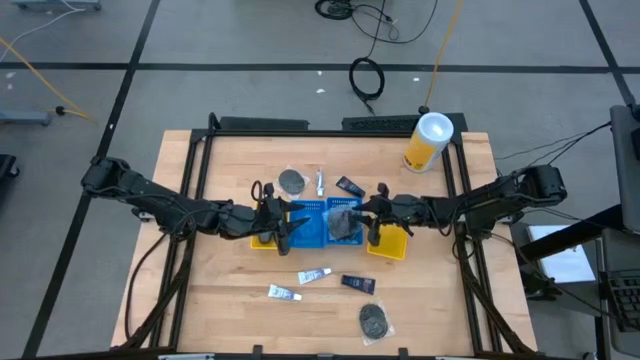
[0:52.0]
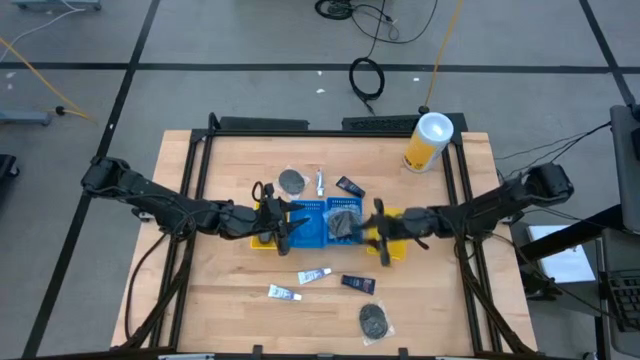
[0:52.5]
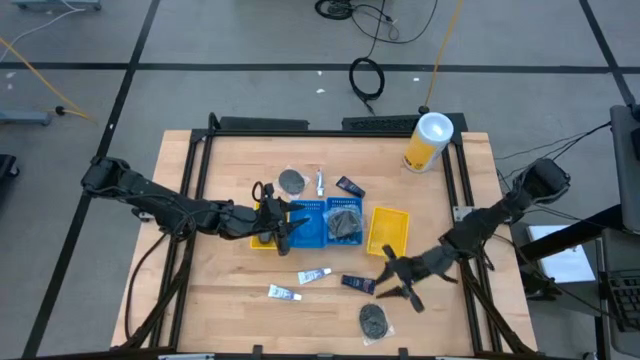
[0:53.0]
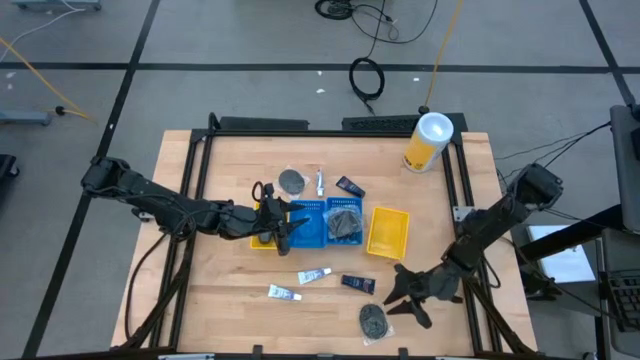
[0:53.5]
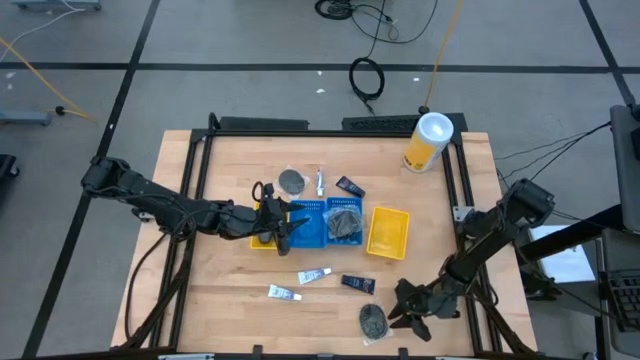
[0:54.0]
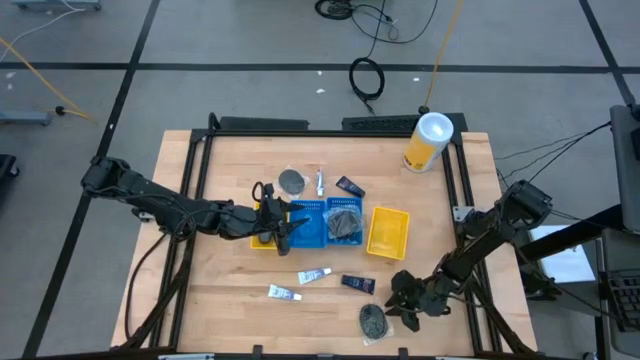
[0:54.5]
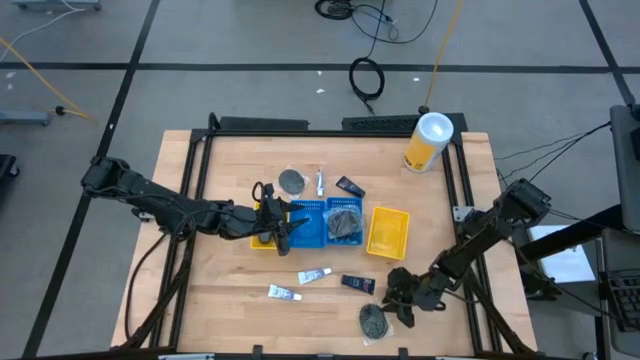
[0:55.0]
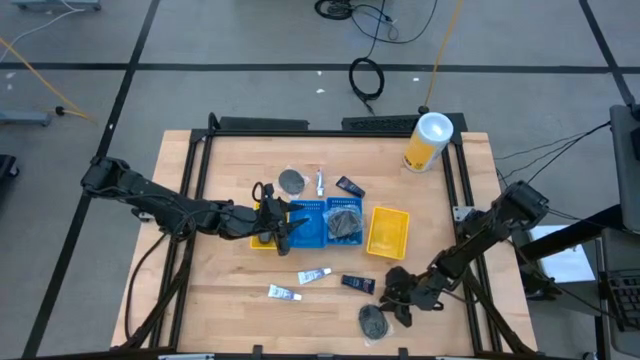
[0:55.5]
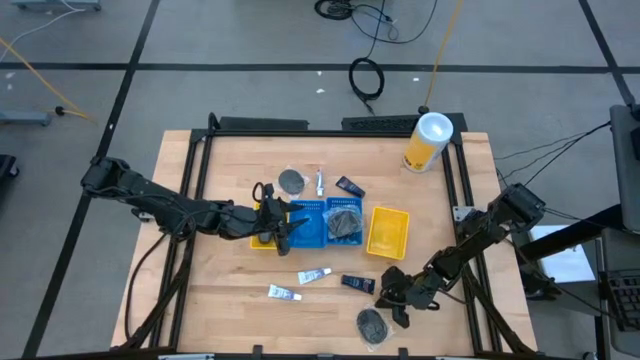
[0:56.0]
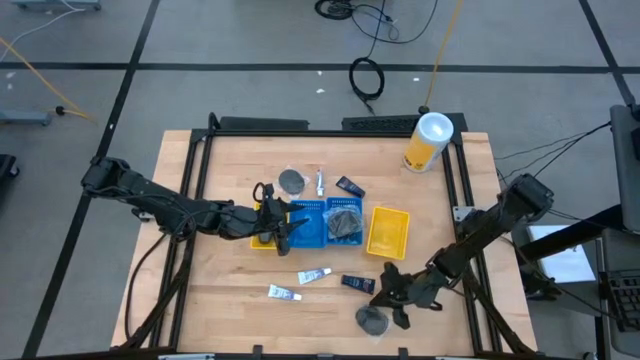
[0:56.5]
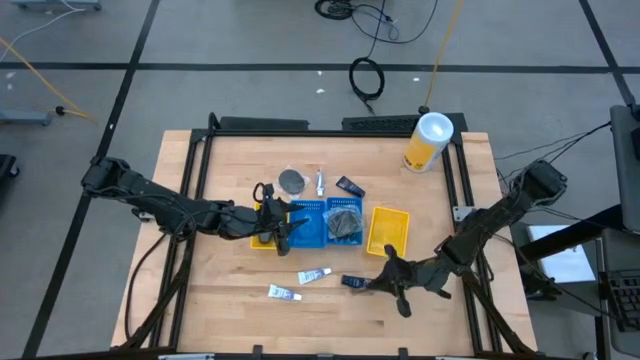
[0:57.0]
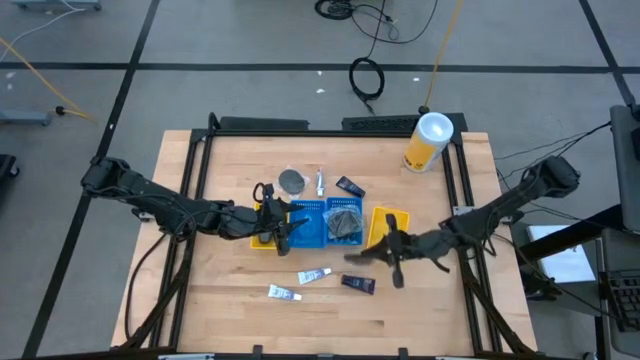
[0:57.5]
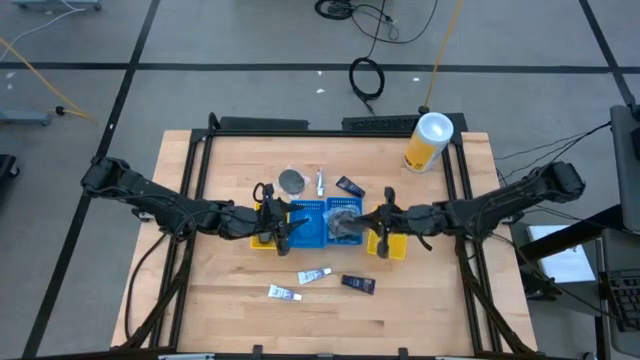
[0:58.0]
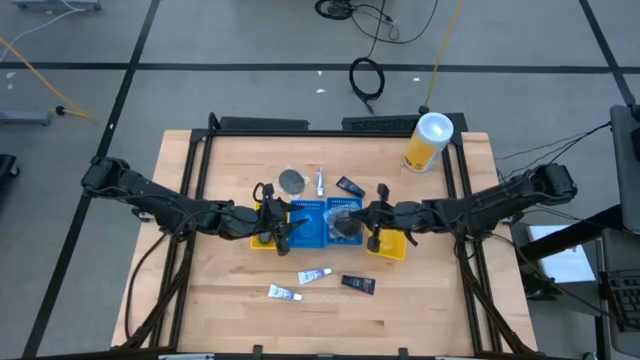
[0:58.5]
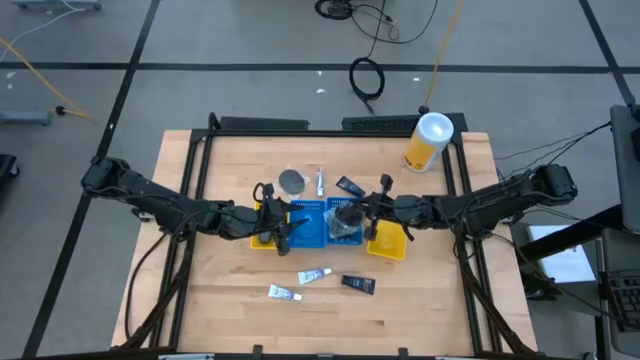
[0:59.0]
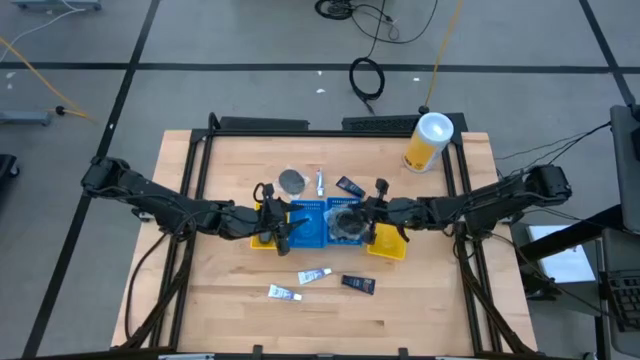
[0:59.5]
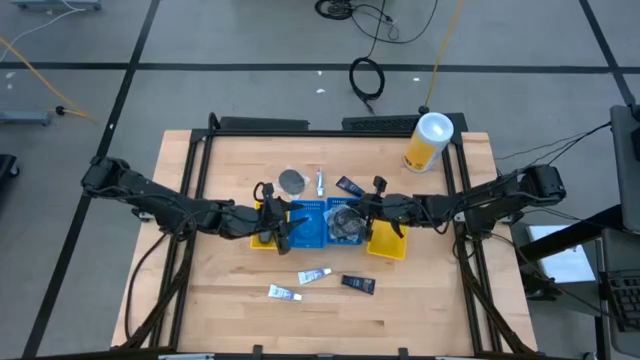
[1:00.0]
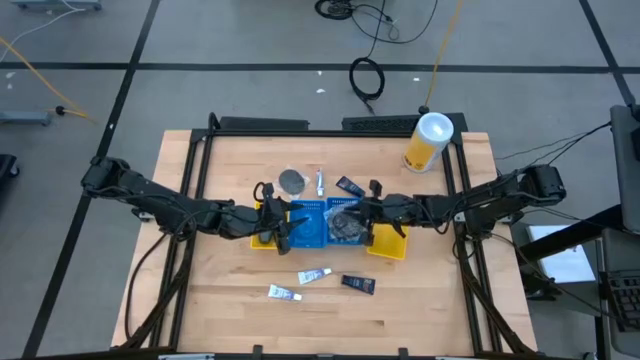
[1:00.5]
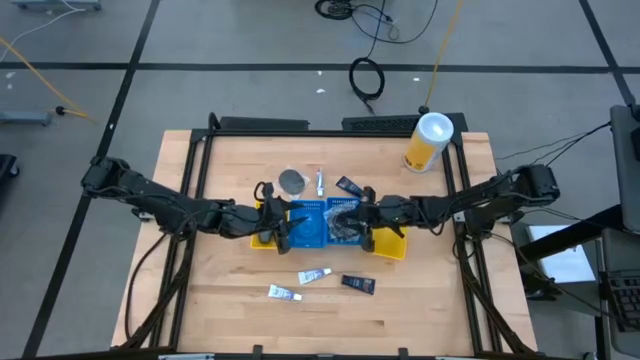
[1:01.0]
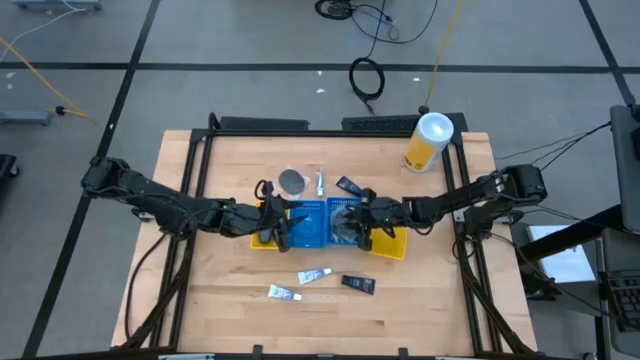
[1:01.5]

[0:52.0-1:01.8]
Task: Pick & Place Travel size toiletries
Put the hairbrush into the right blue bin

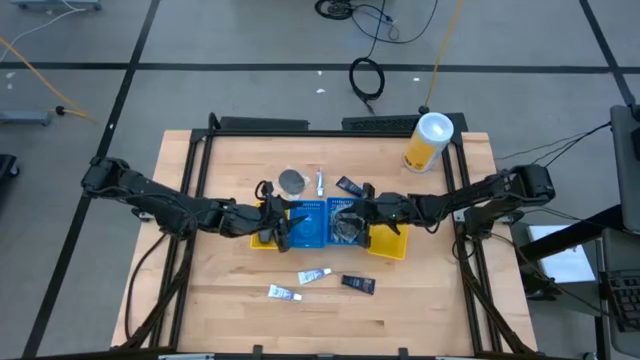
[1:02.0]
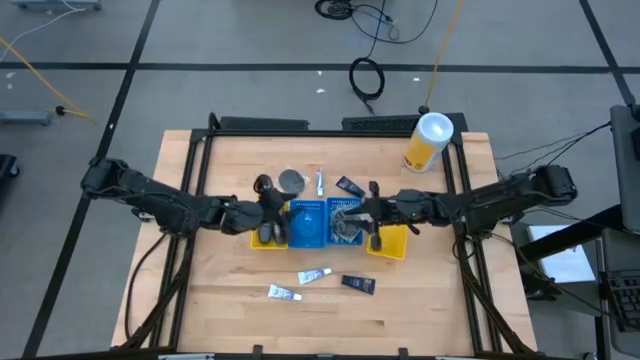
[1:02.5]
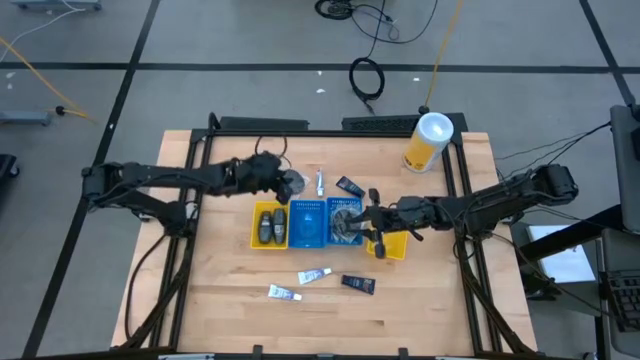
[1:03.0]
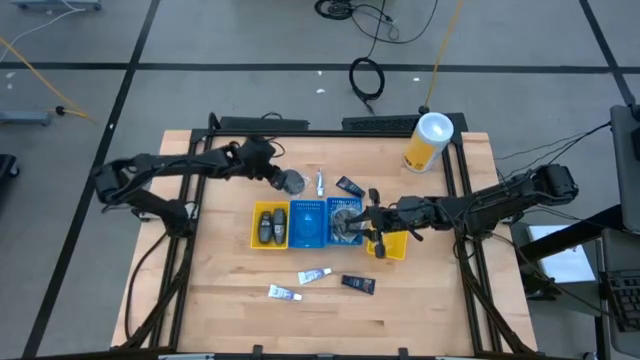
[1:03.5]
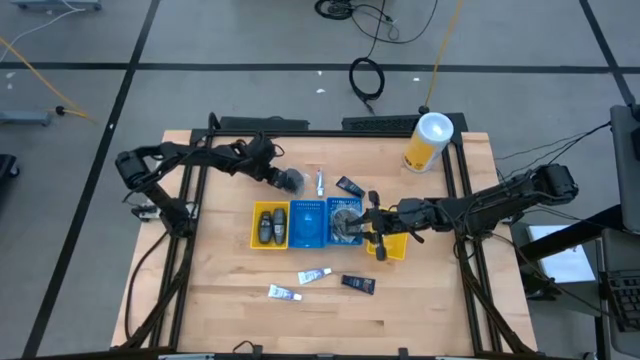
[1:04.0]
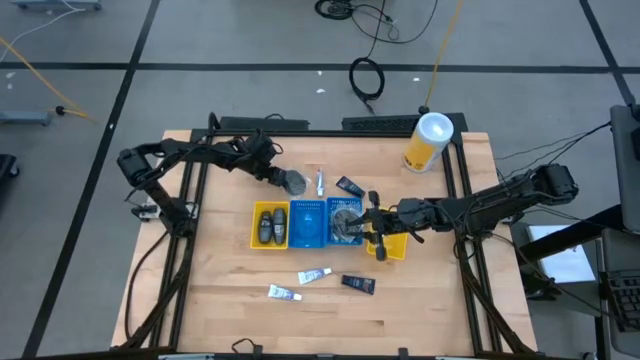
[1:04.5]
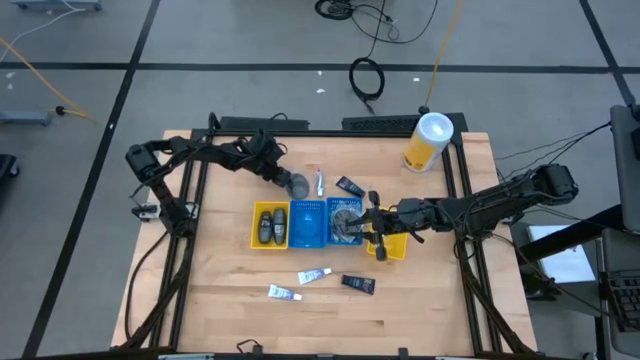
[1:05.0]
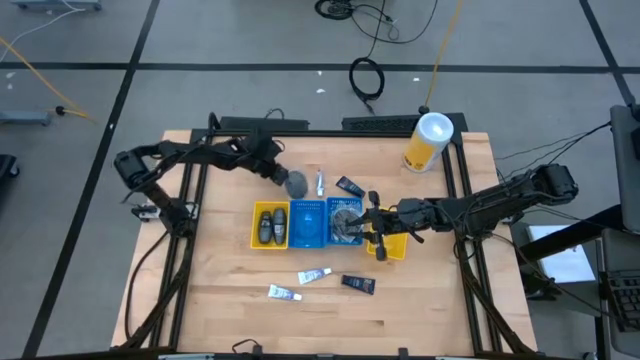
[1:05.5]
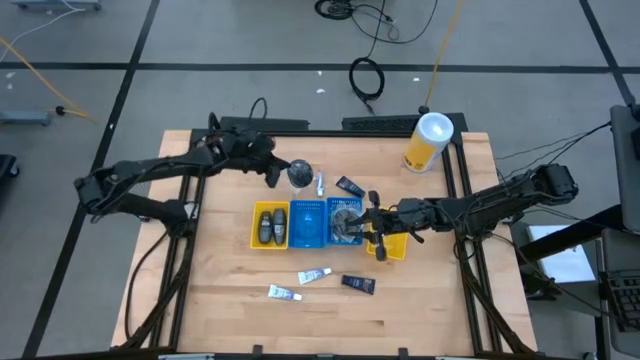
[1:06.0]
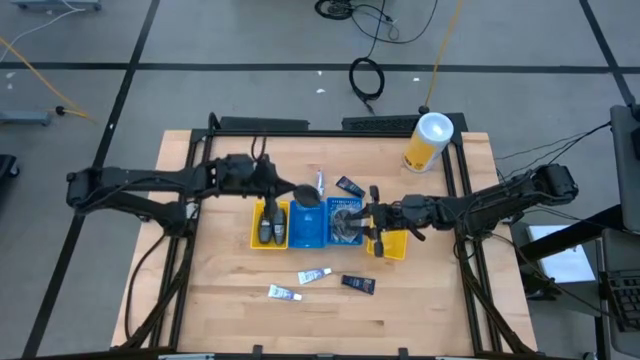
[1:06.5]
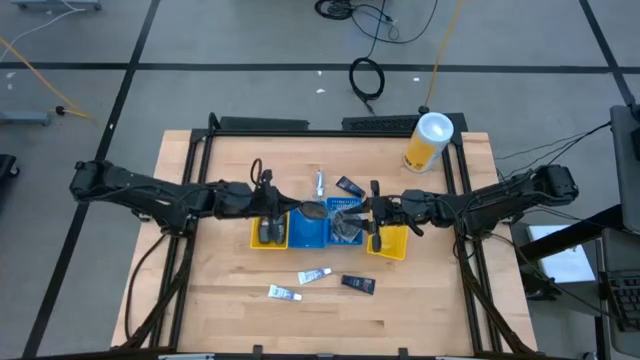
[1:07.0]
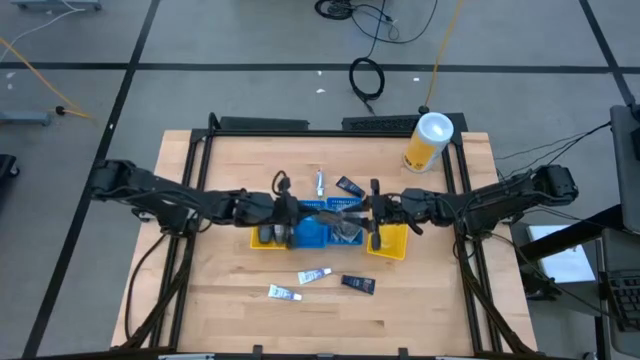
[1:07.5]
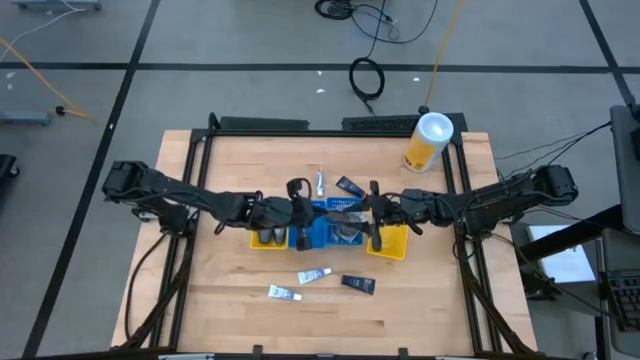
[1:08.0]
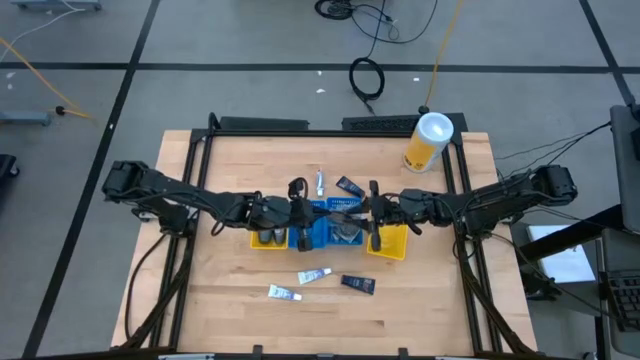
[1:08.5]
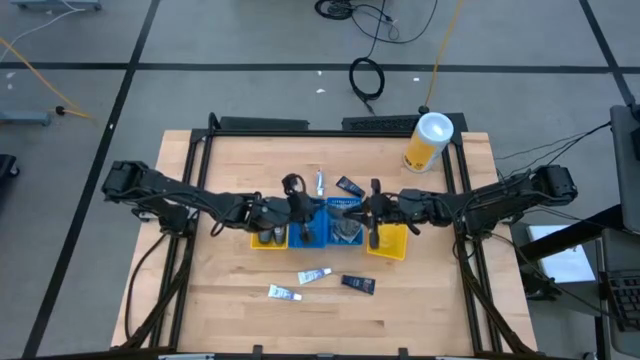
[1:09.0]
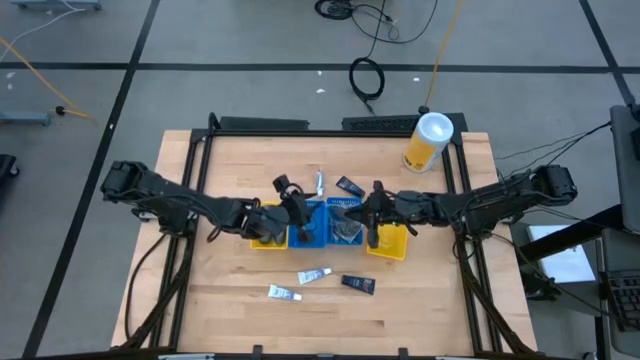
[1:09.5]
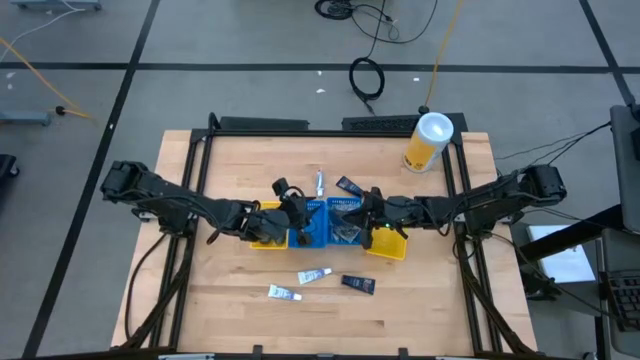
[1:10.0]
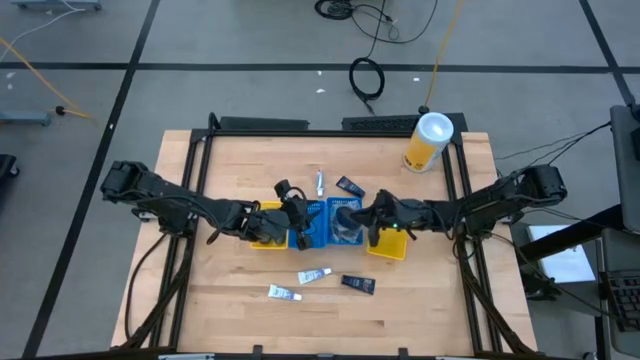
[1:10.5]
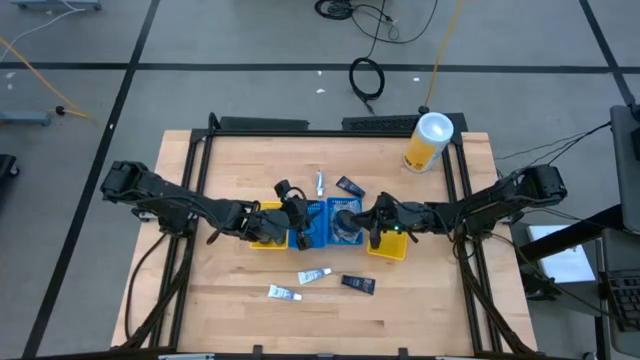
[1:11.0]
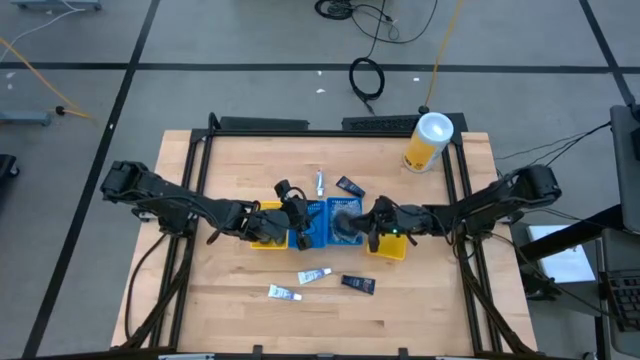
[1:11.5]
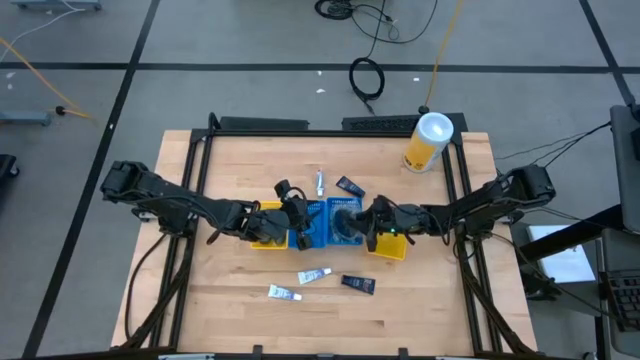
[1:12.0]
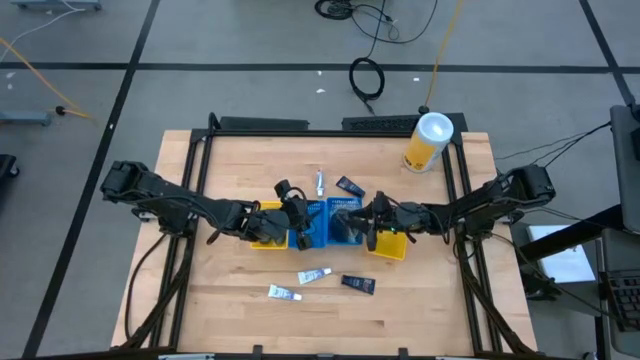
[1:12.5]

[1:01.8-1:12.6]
Put the hairbrush into the right blue bin
